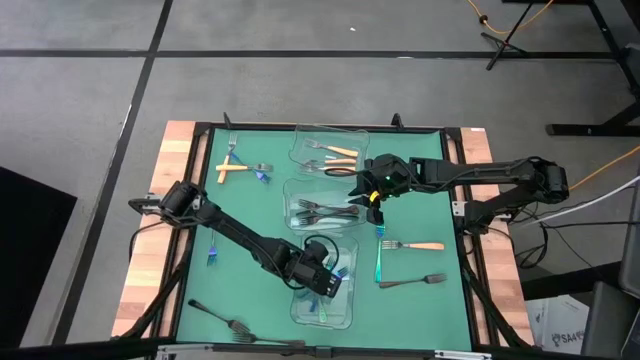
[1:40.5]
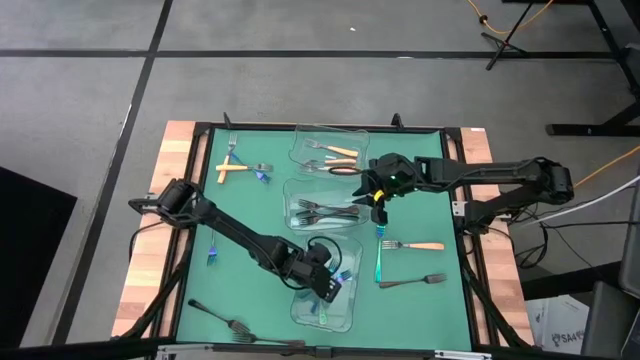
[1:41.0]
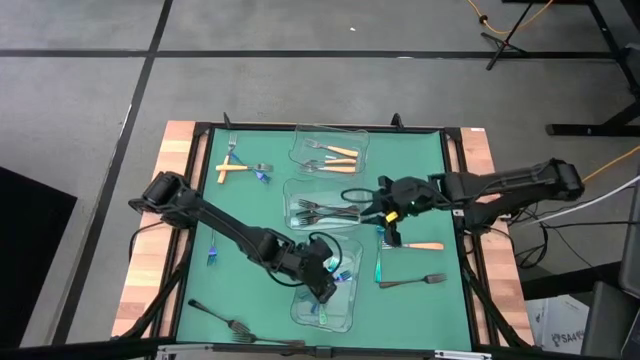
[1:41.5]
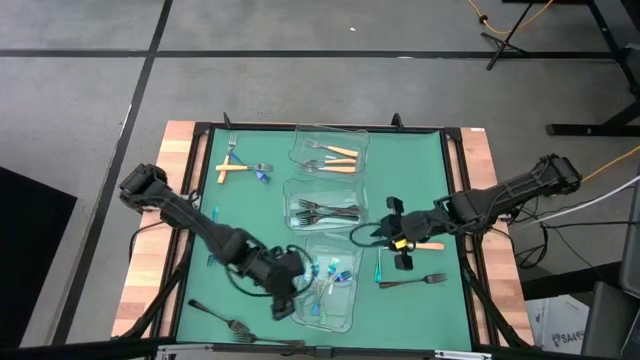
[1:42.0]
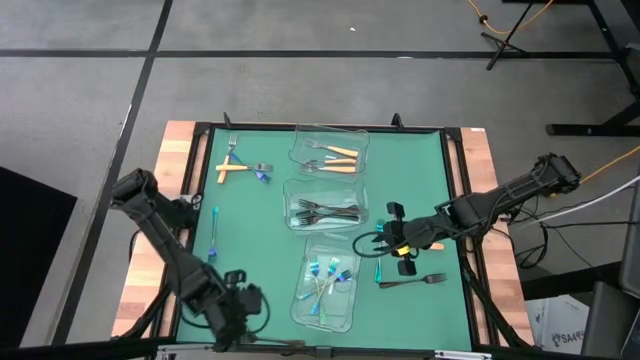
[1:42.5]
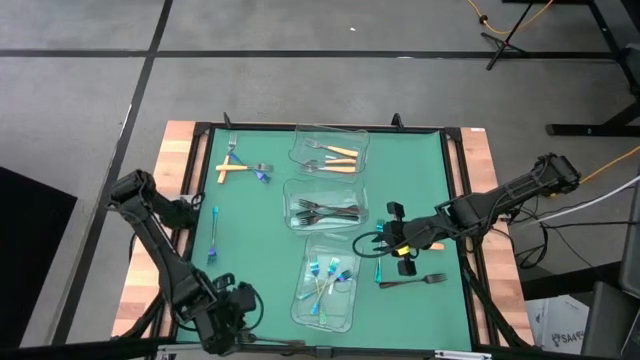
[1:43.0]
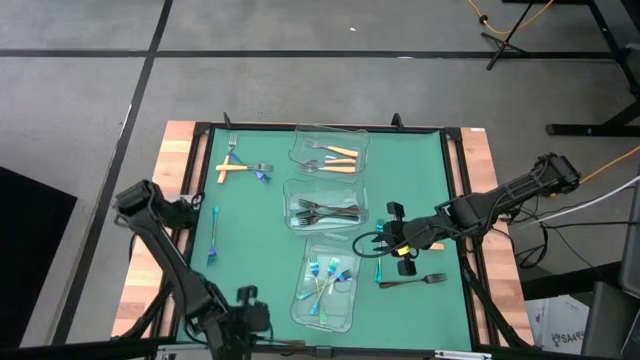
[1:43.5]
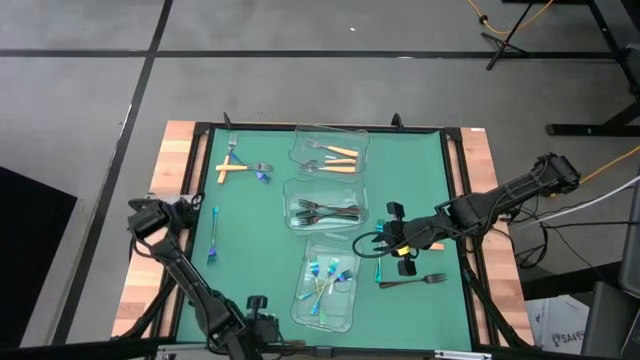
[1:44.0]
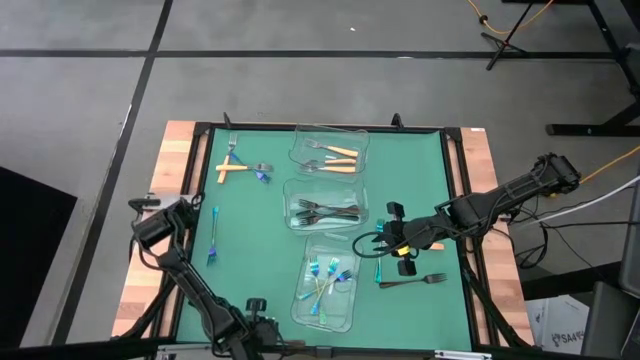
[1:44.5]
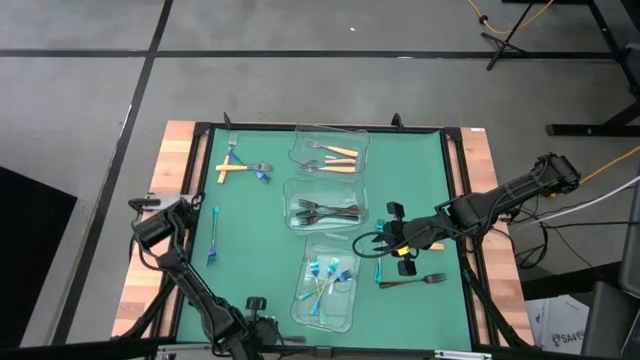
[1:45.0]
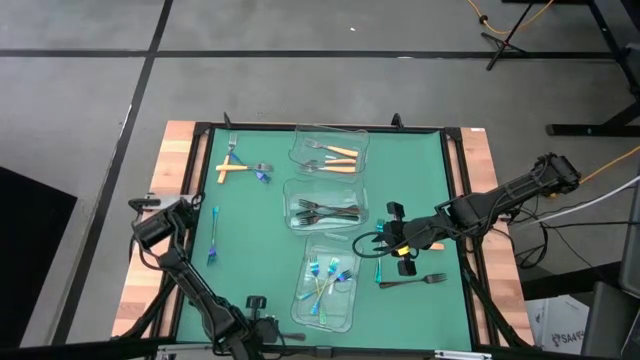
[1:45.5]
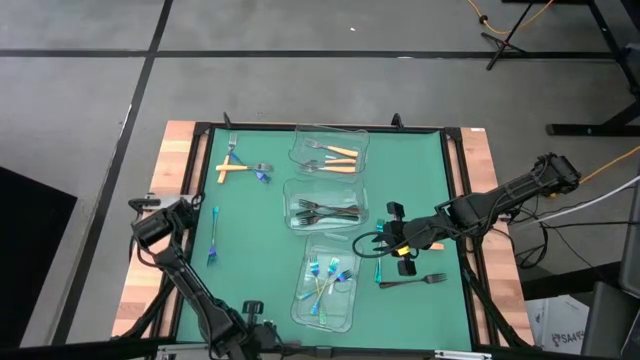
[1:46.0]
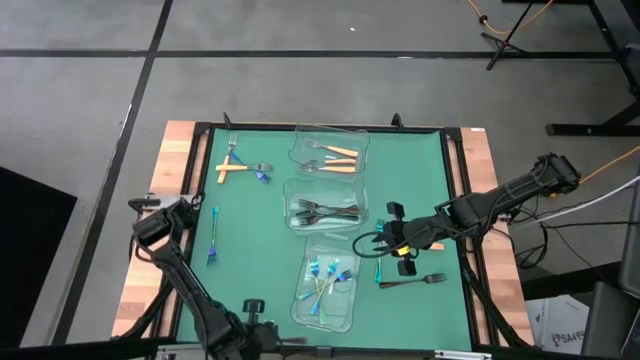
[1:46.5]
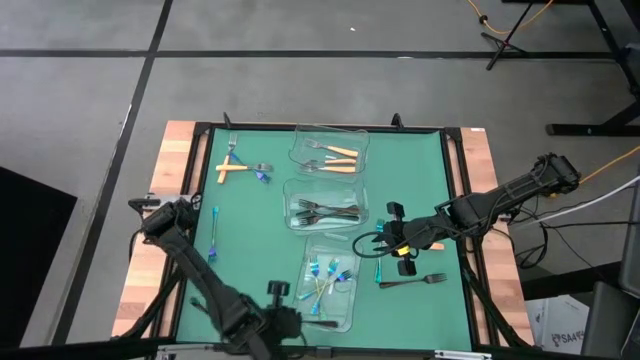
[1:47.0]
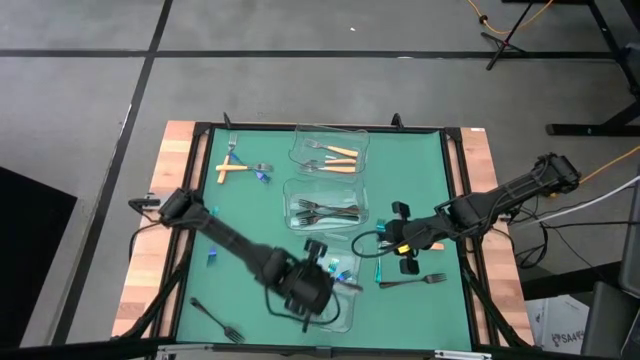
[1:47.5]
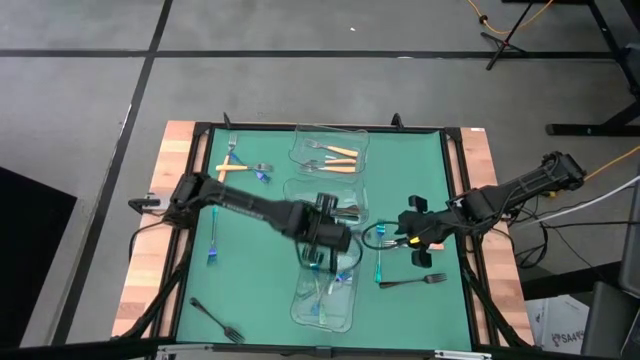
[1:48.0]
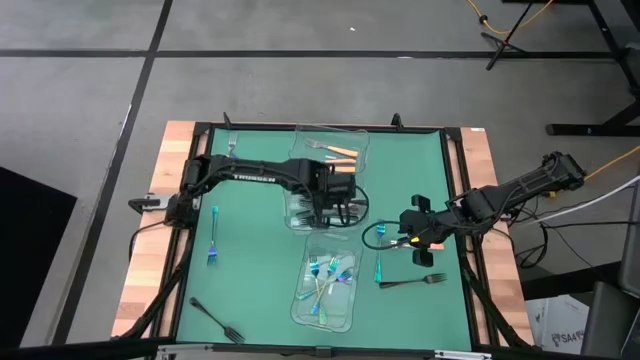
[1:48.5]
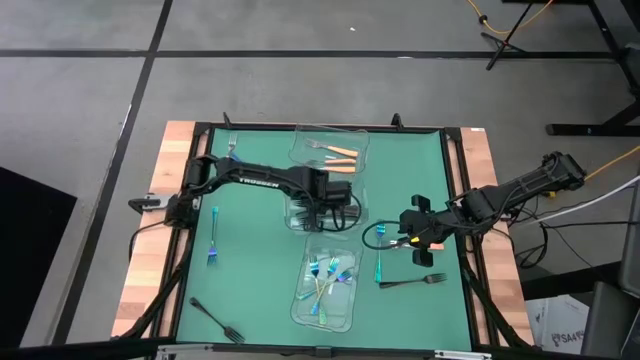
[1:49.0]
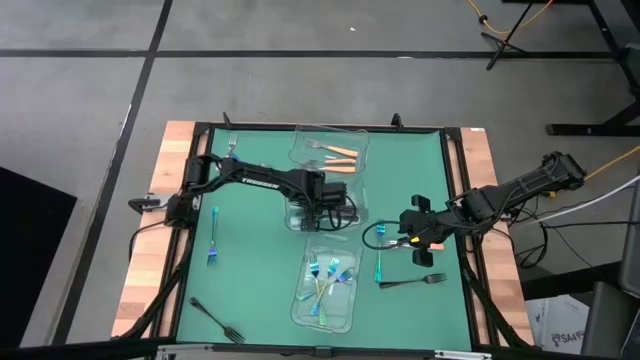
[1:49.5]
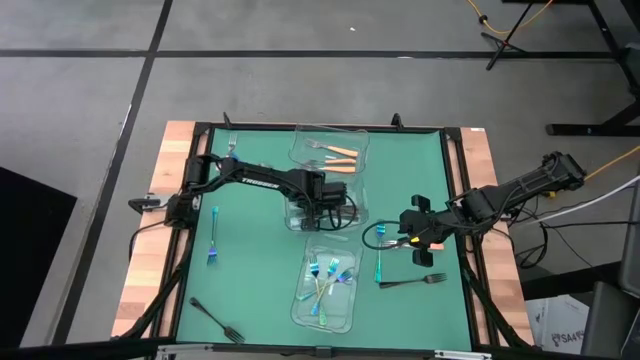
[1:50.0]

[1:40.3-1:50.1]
Task: Sort silverware by color (type)
Put the black fork into the middle transparent bin

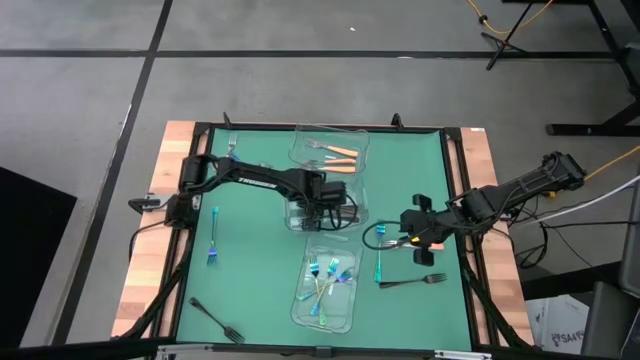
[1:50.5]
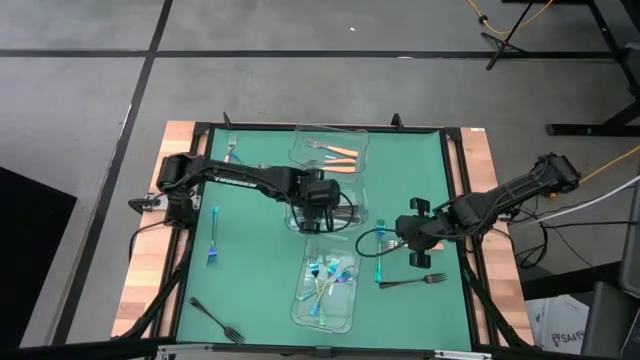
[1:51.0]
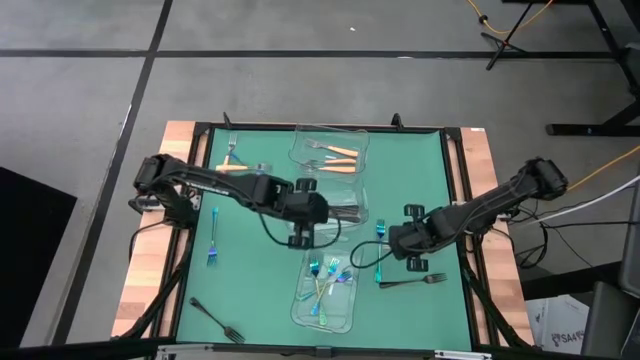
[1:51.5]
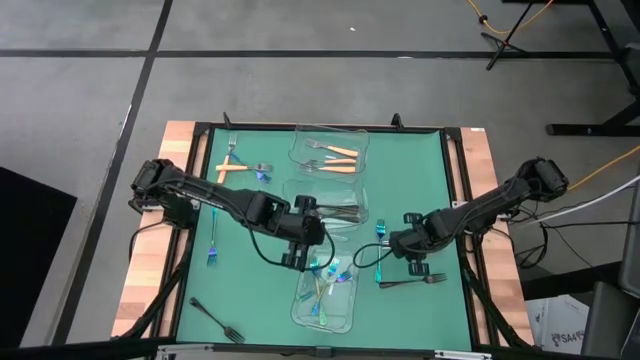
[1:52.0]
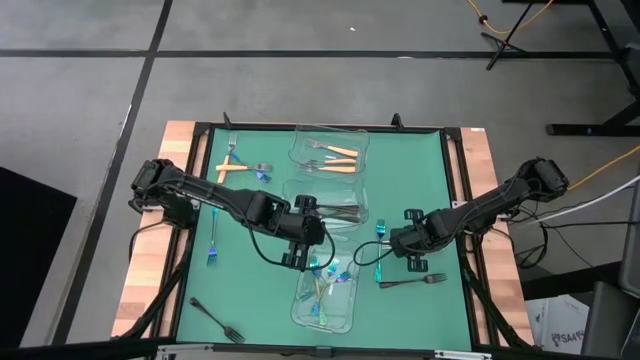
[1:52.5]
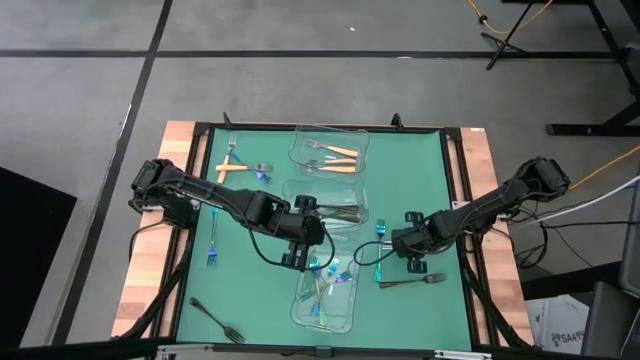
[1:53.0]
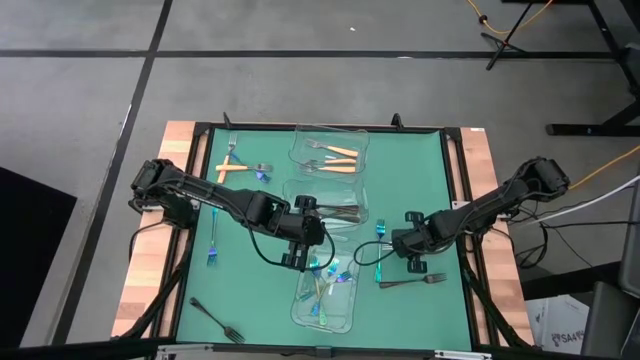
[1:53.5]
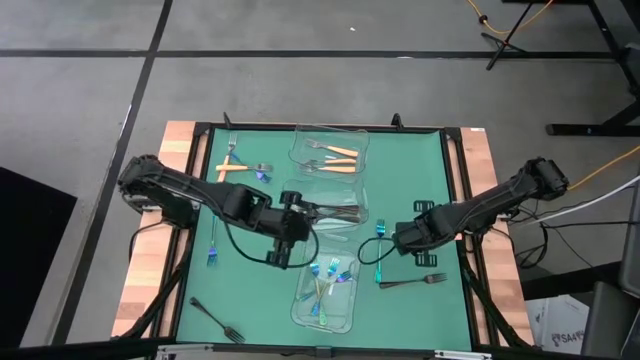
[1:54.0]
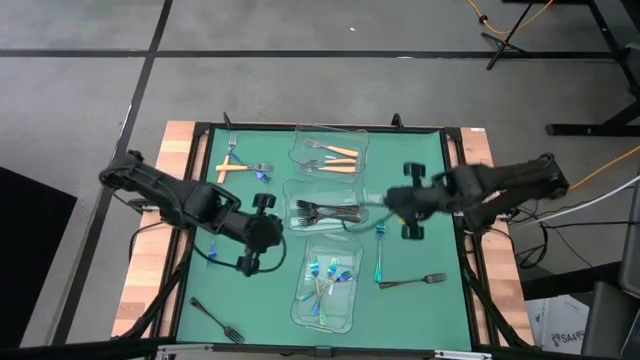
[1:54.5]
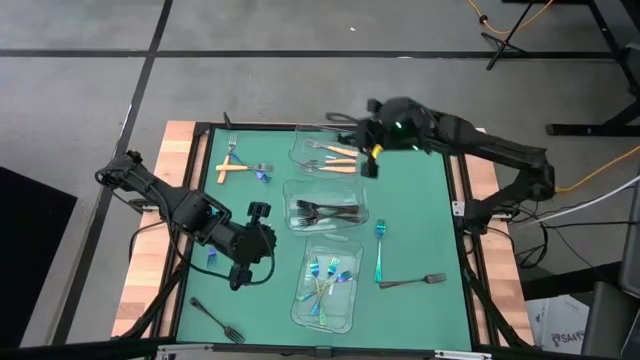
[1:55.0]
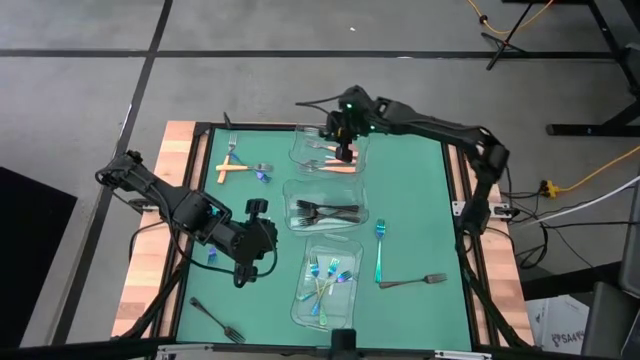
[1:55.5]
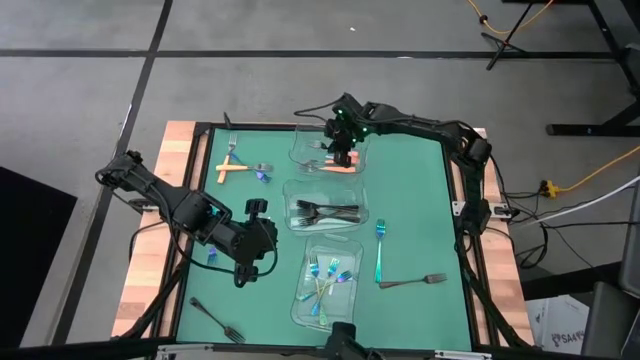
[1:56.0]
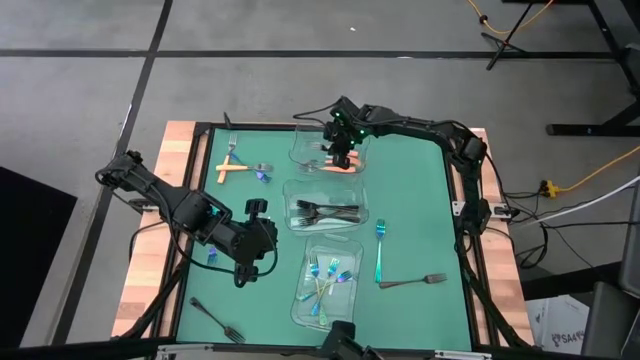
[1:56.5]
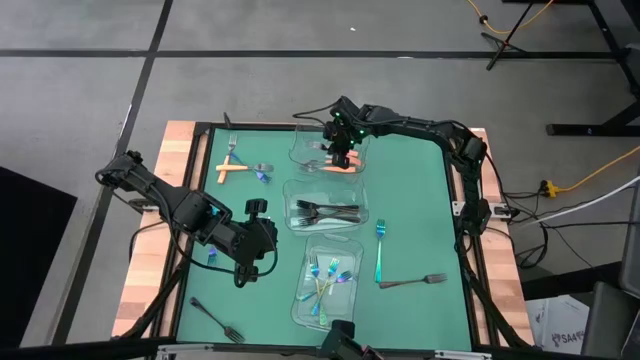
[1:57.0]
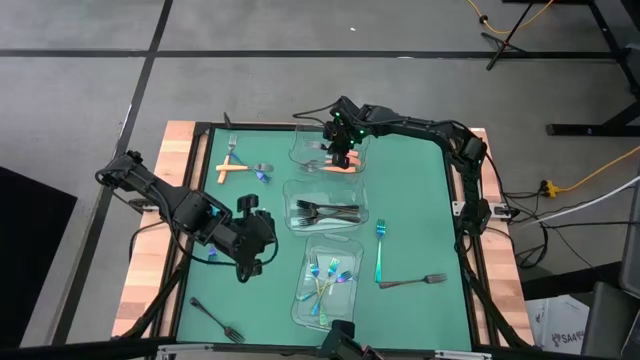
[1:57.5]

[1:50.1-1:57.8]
Put the yellow fork into the top transparent bin

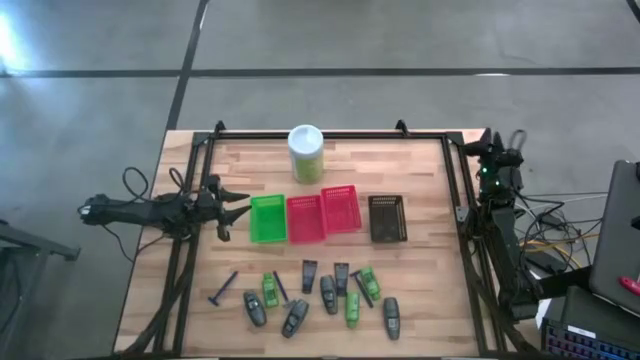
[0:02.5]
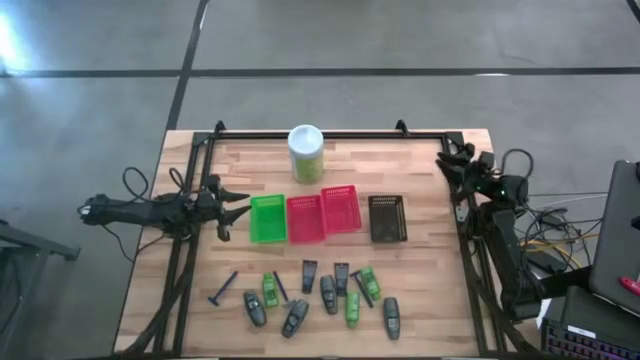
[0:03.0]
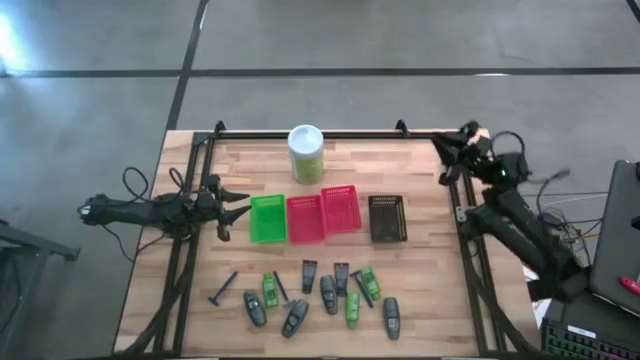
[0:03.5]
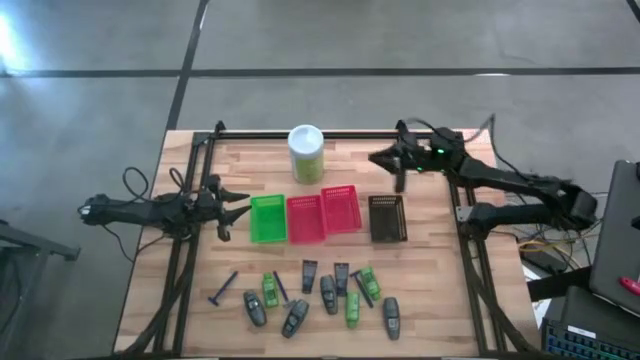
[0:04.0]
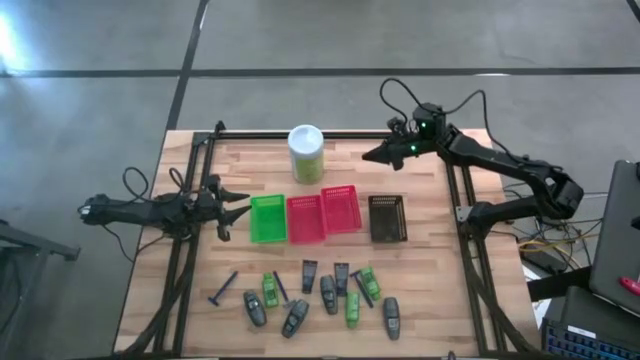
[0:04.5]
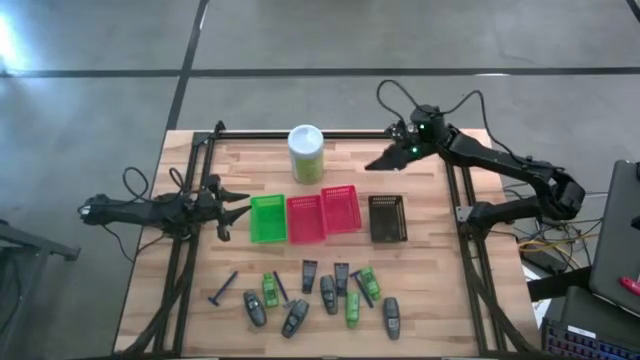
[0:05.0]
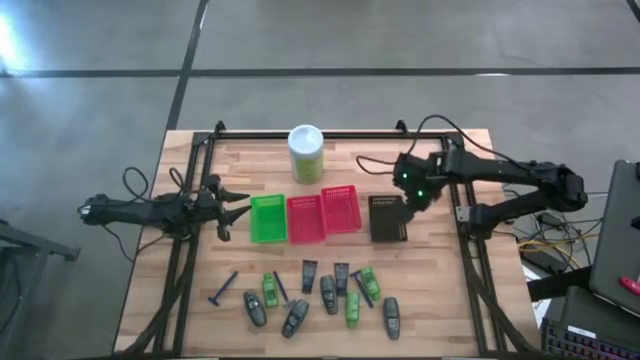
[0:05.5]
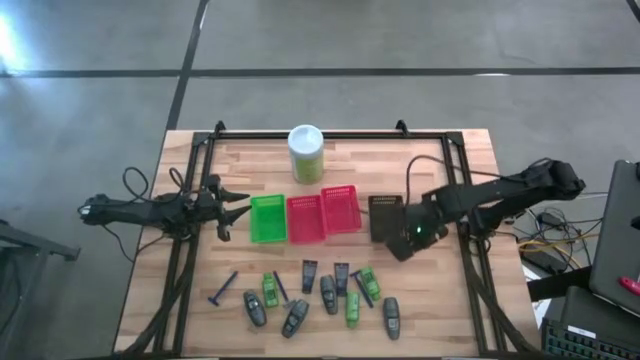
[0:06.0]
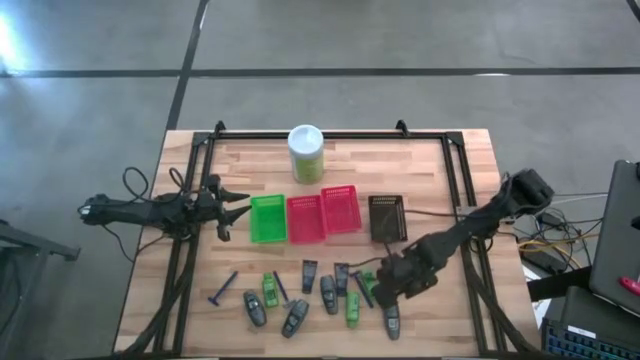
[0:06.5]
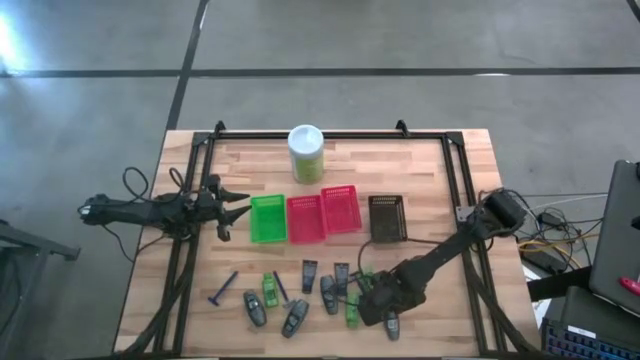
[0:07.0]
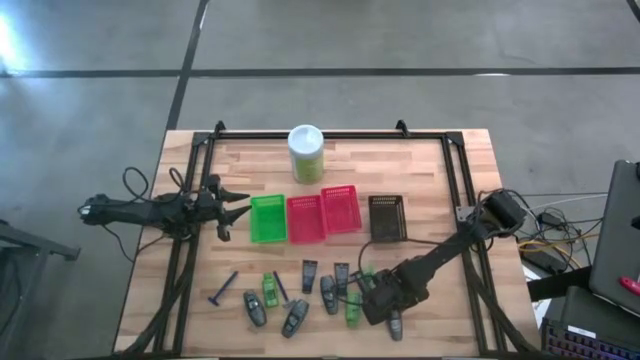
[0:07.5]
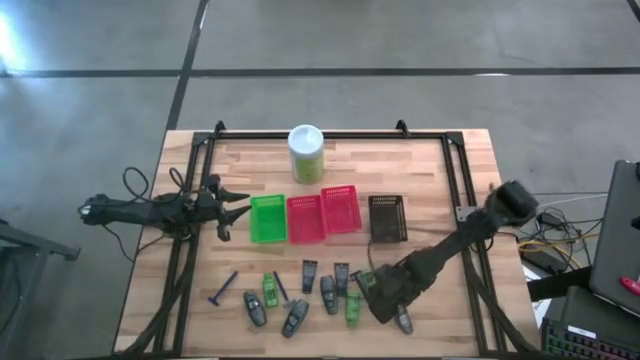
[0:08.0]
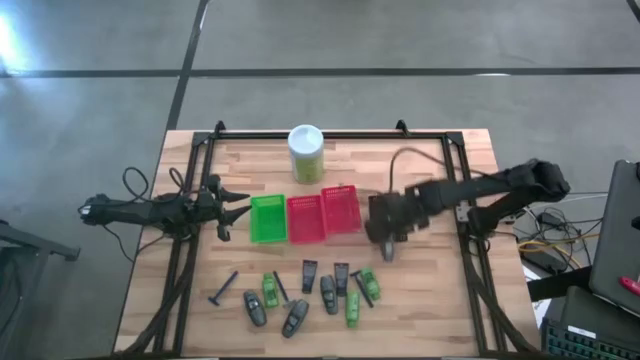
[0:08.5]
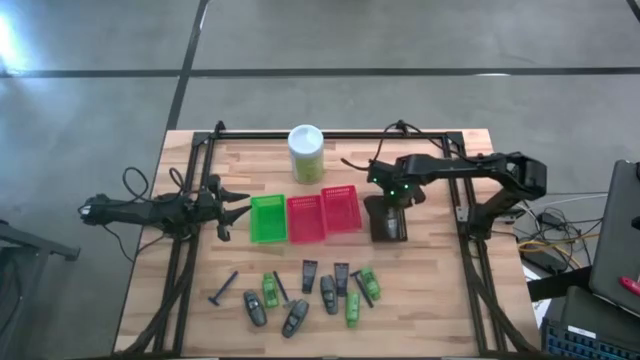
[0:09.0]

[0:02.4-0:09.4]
Task: Pick & Place Travel size toiletries
Put the black deodorant into the black bin
